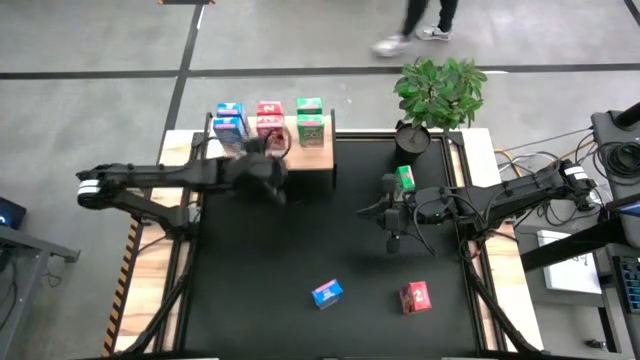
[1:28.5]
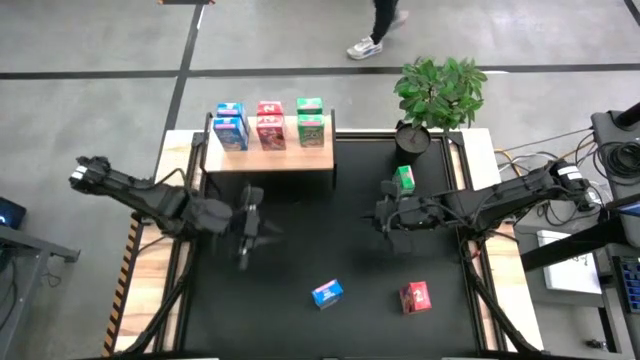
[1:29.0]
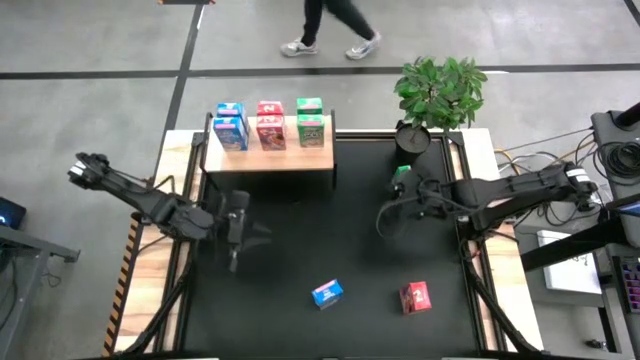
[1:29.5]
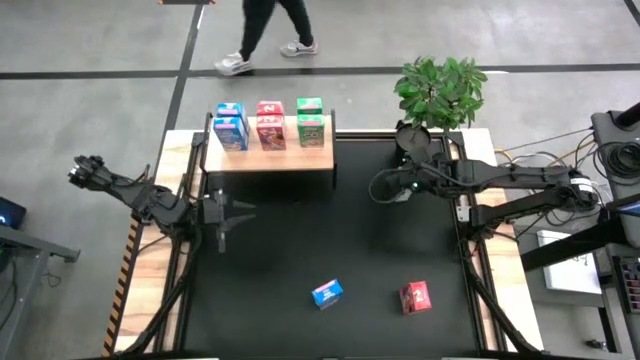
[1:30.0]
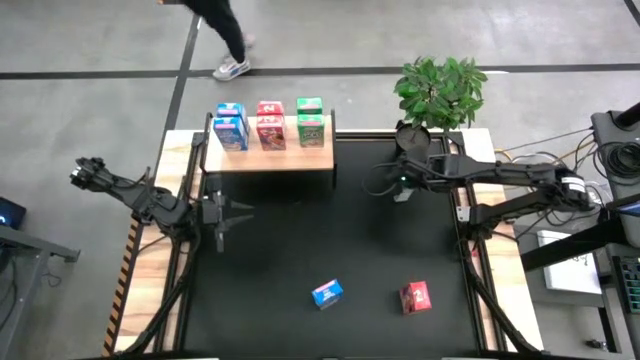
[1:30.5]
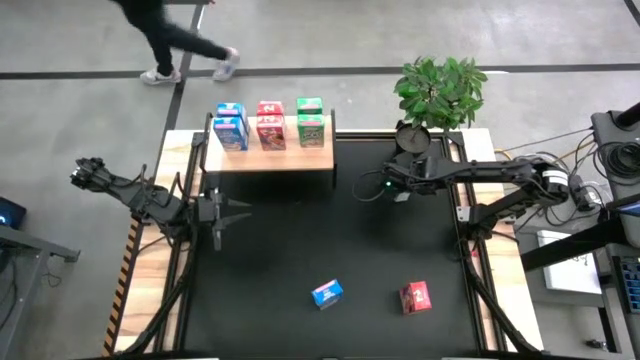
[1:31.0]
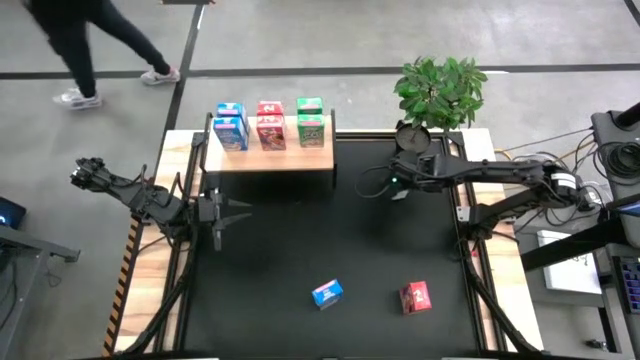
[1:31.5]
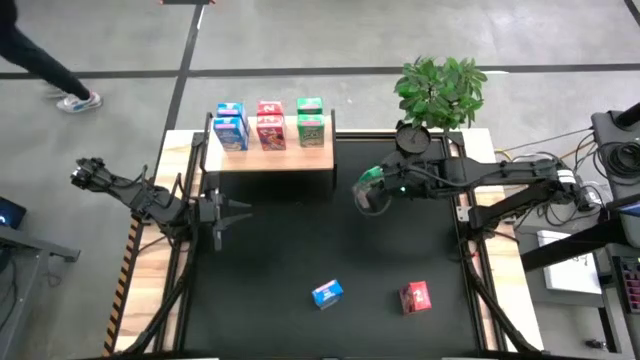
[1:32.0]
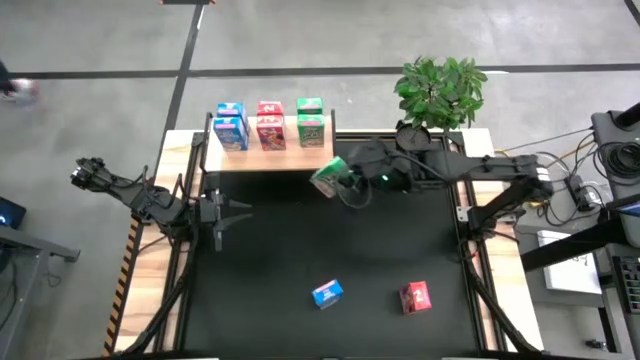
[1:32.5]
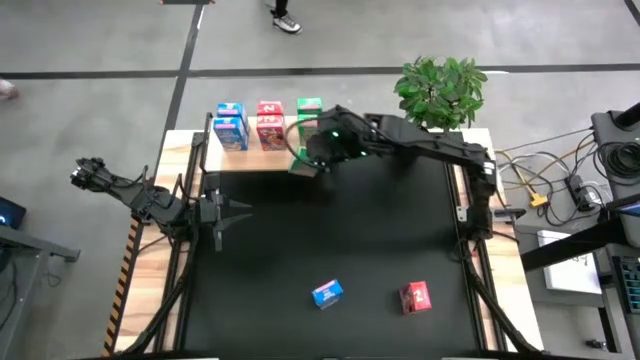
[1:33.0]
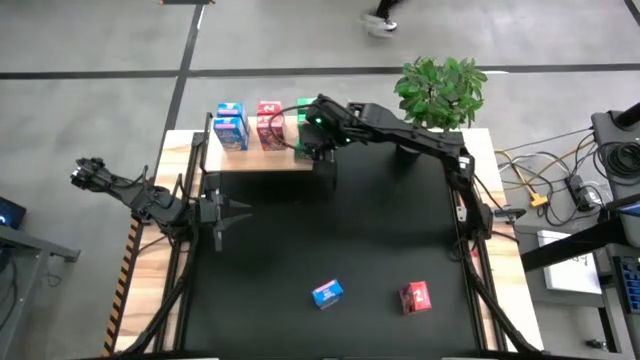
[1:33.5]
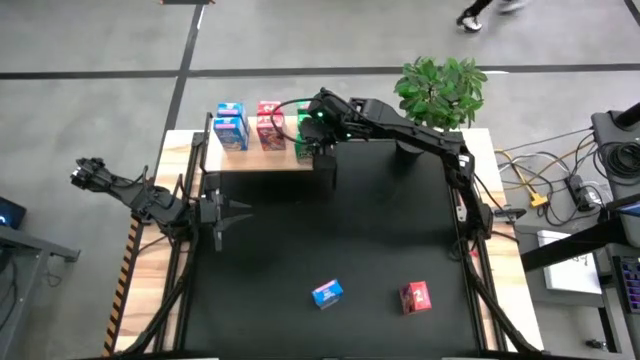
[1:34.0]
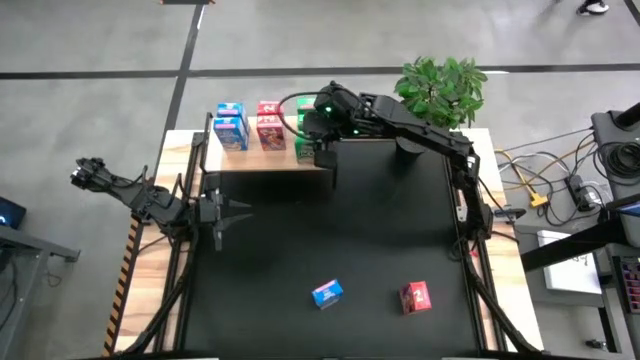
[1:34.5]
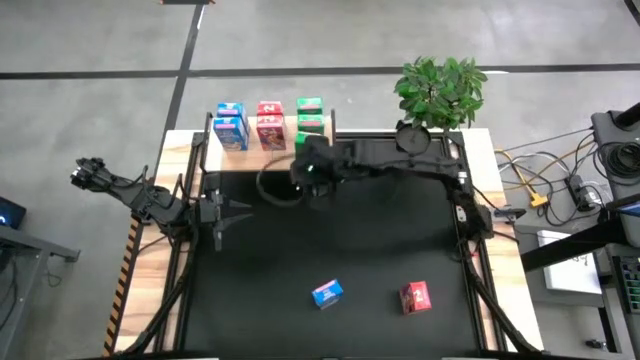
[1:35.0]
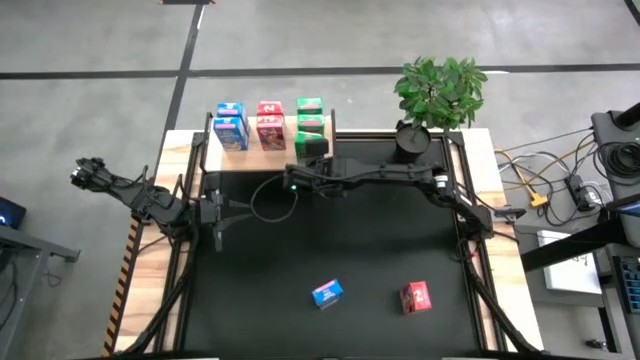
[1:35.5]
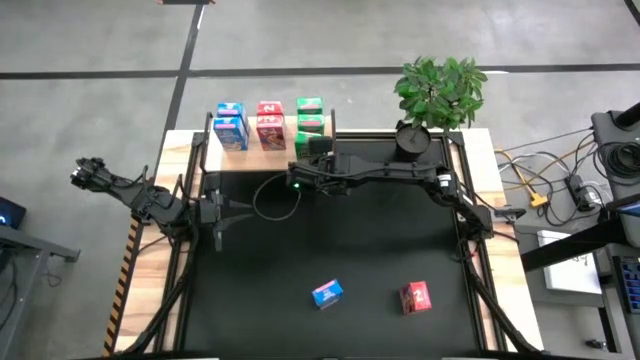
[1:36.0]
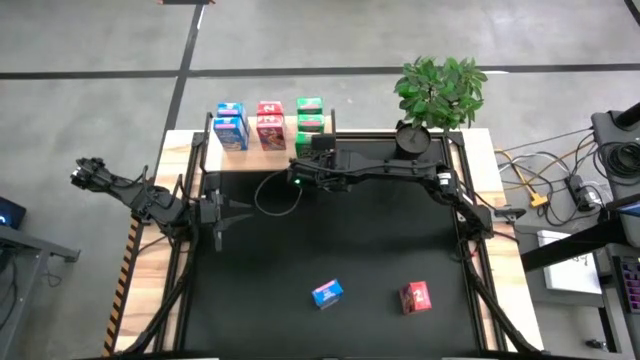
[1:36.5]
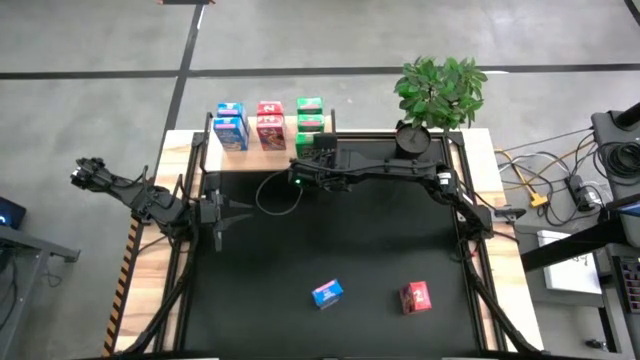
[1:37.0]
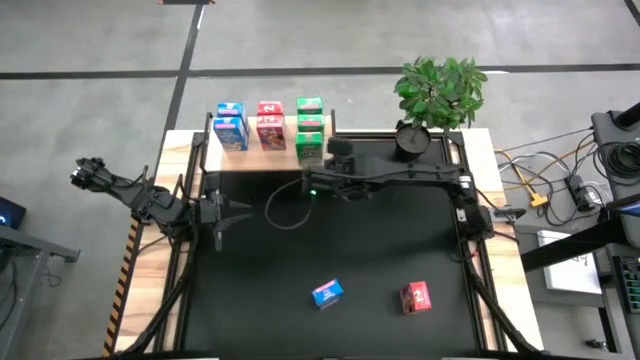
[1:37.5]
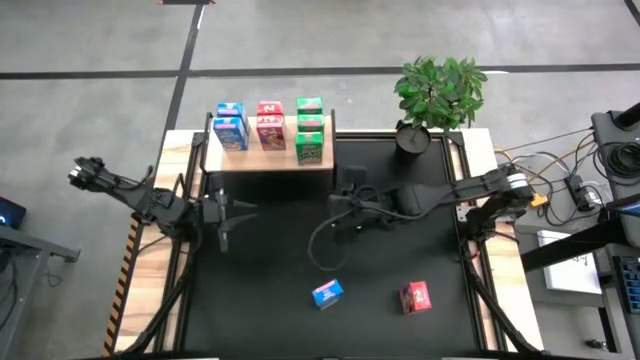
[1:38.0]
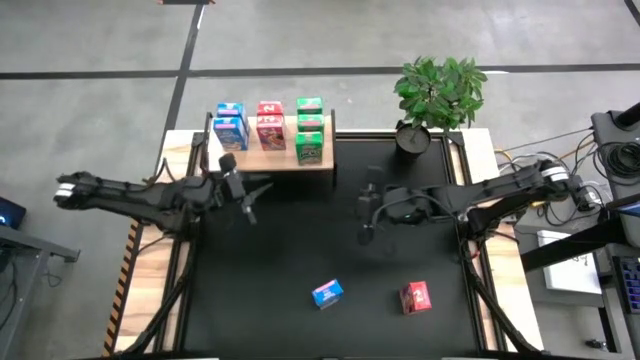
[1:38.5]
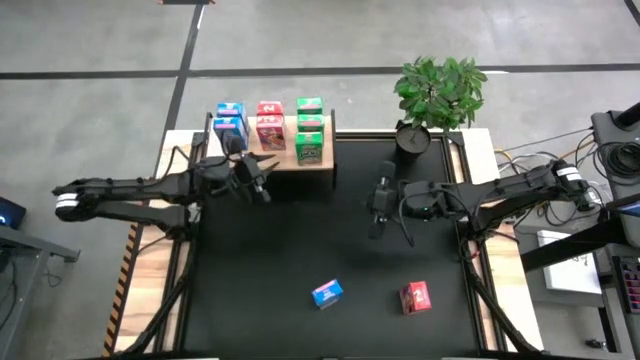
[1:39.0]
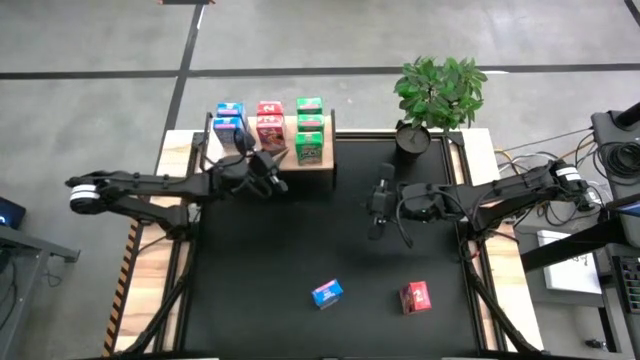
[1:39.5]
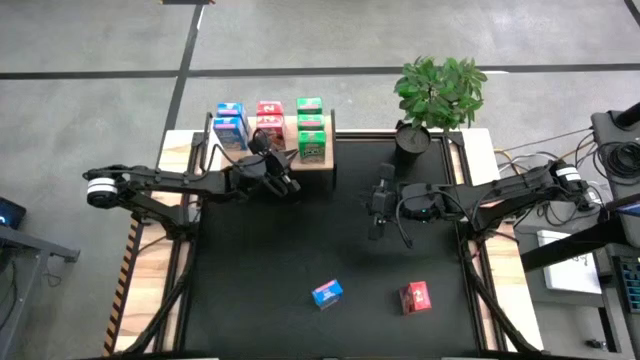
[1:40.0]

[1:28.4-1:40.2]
Task: Stack cereal on shelf
Put the green cereal box on the shelf aligned with the other green cereal boxes

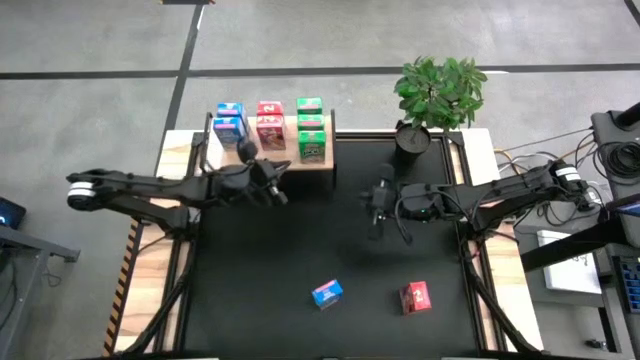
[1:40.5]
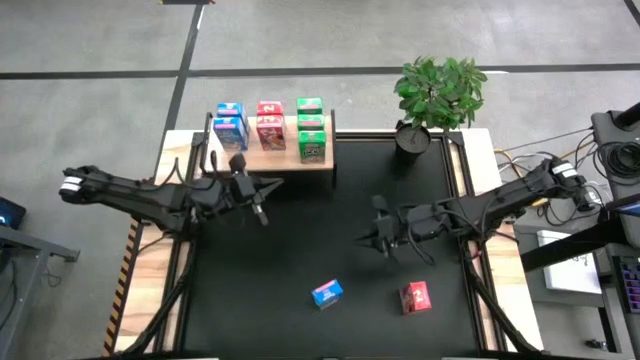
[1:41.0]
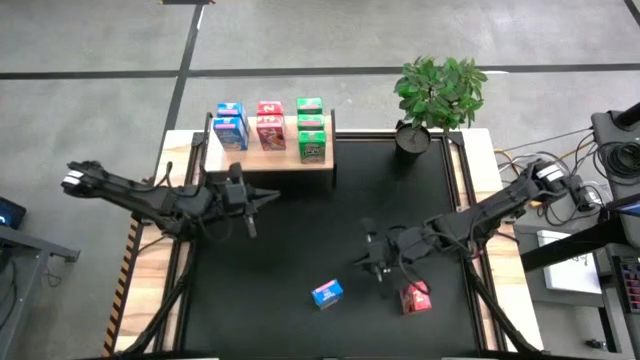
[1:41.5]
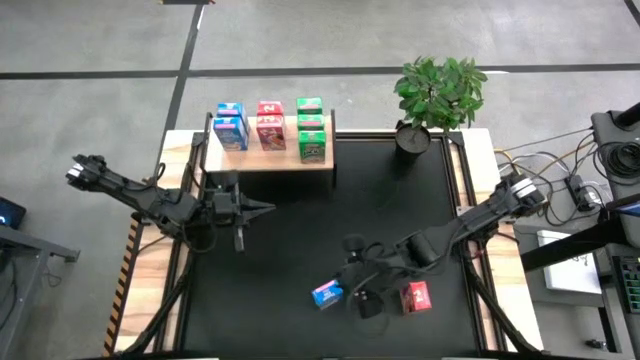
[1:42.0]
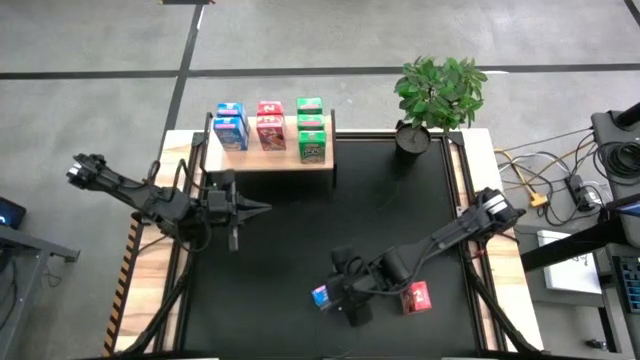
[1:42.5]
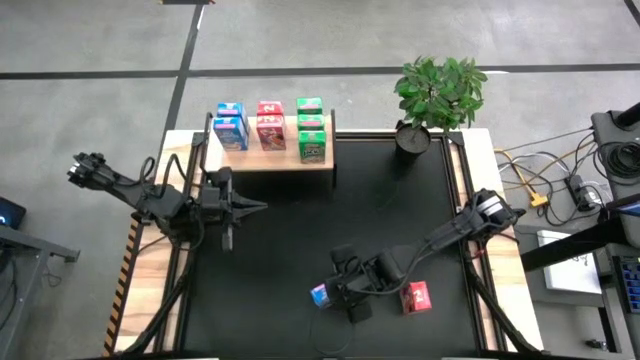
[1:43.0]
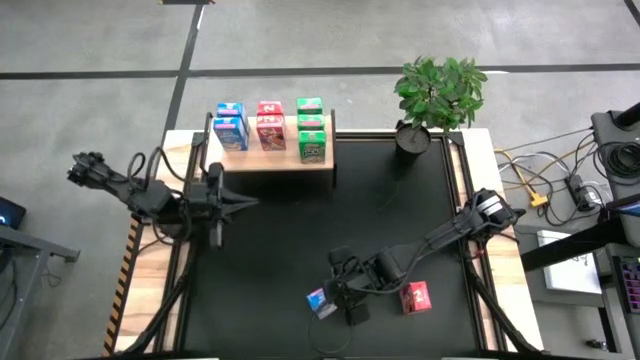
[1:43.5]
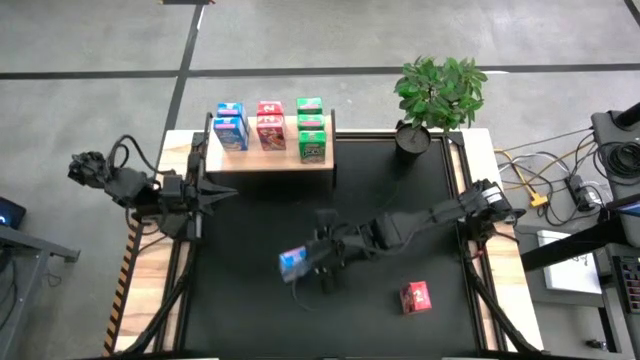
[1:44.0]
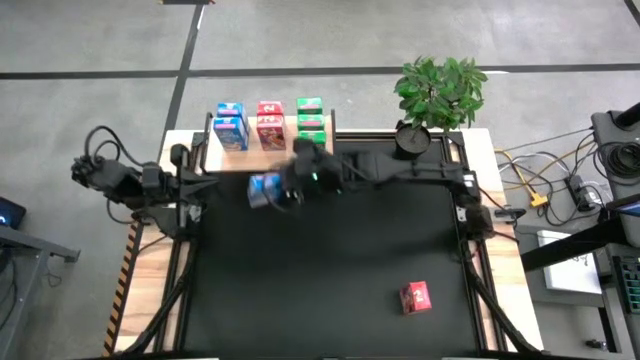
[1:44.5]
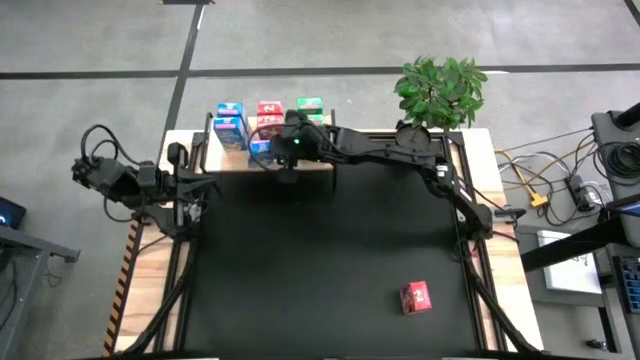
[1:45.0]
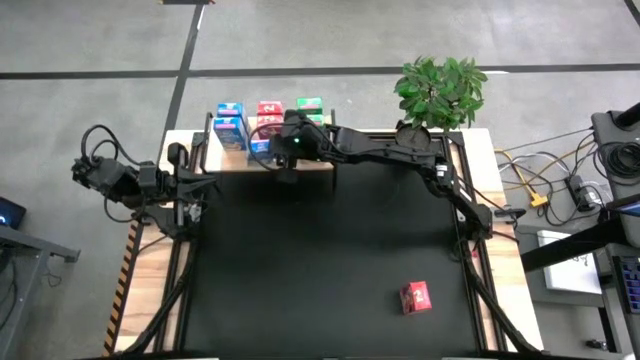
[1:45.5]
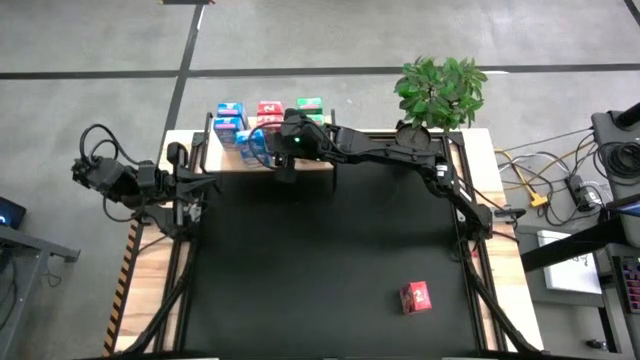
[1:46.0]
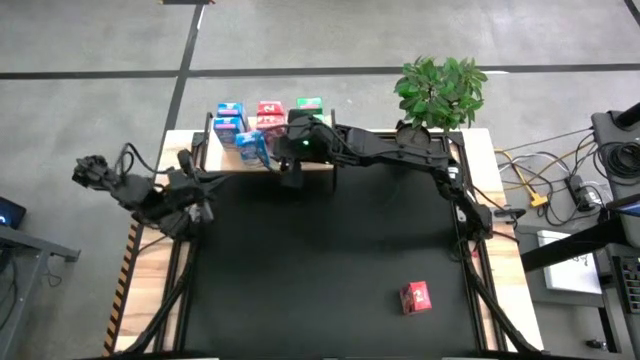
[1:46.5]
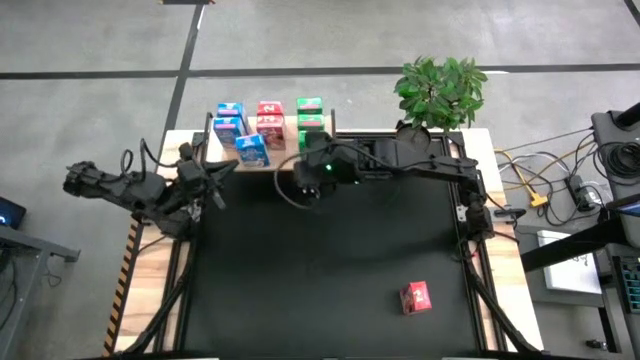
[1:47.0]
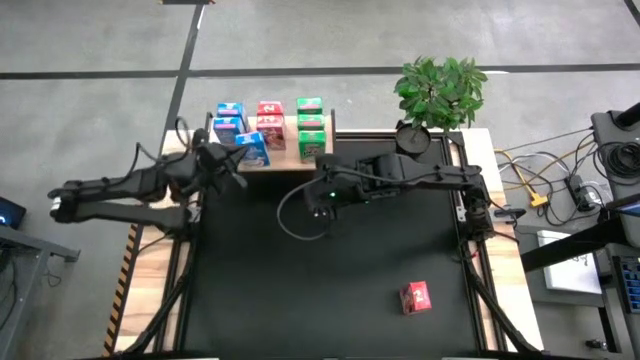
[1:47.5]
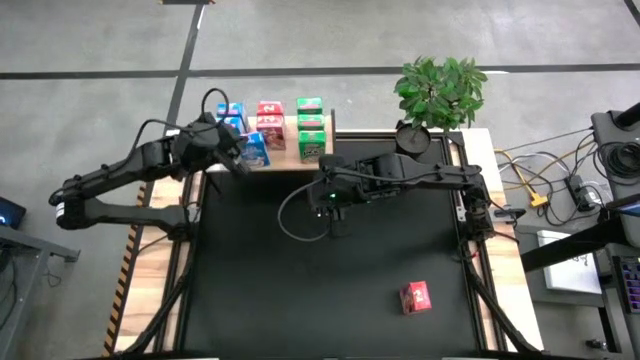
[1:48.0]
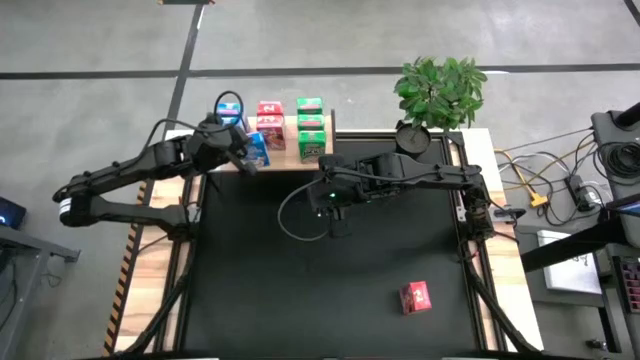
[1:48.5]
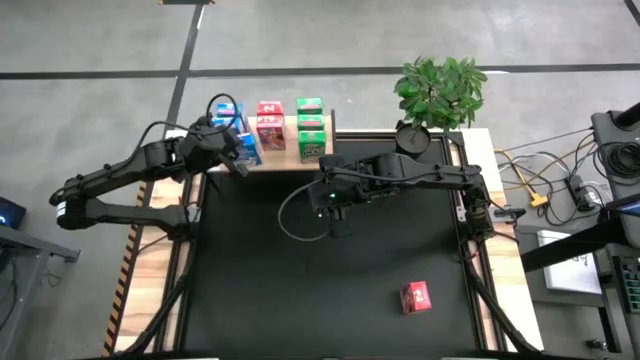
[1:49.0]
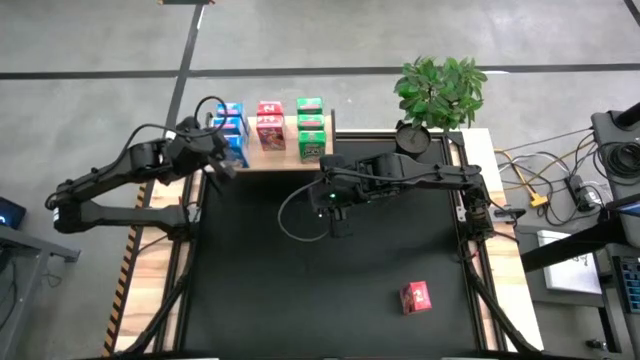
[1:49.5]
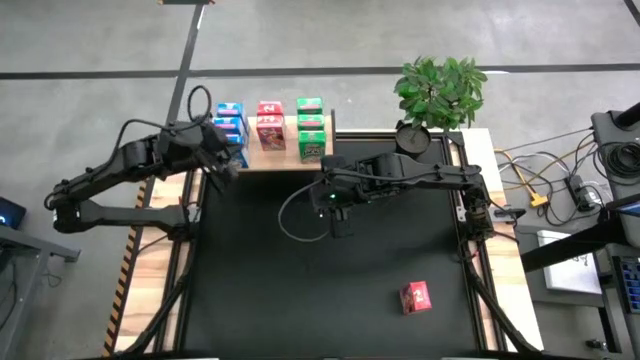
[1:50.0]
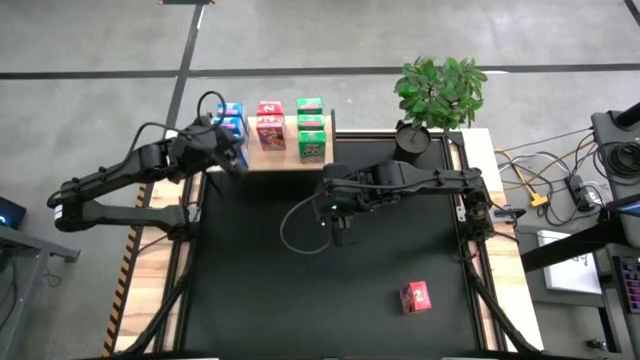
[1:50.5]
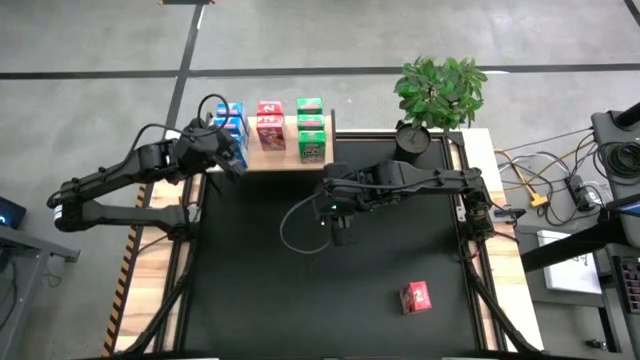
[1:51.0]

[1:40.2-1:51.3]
Put the blue cereal box on the shelf aligned with the other blue cereal boxes
